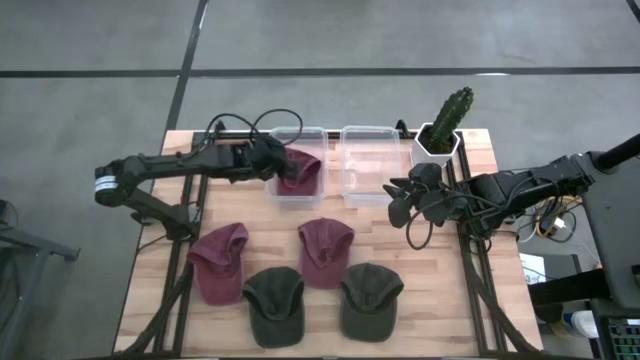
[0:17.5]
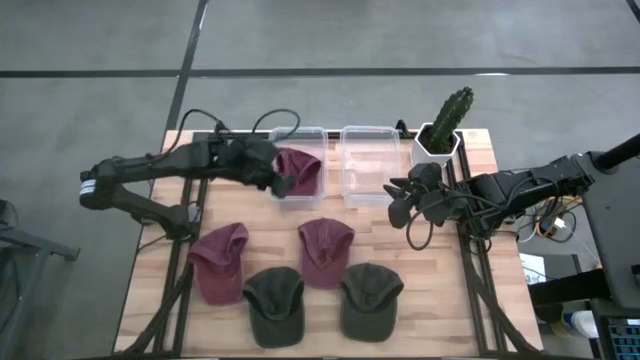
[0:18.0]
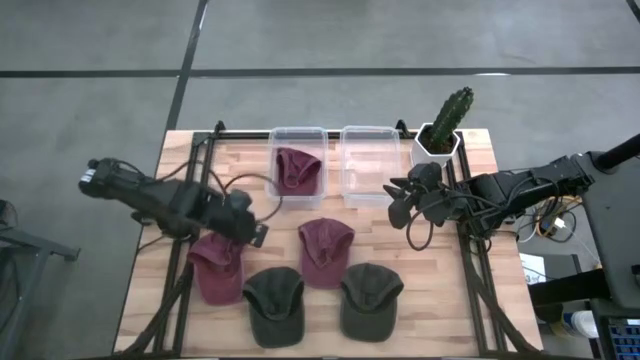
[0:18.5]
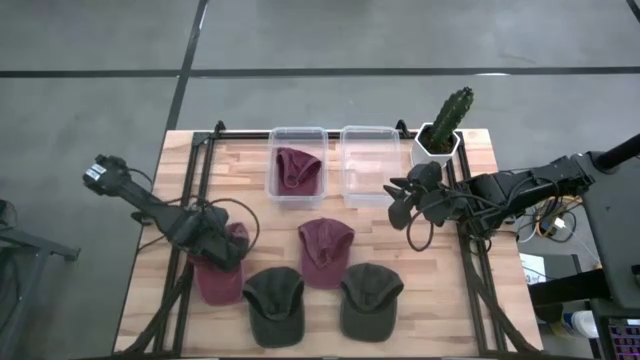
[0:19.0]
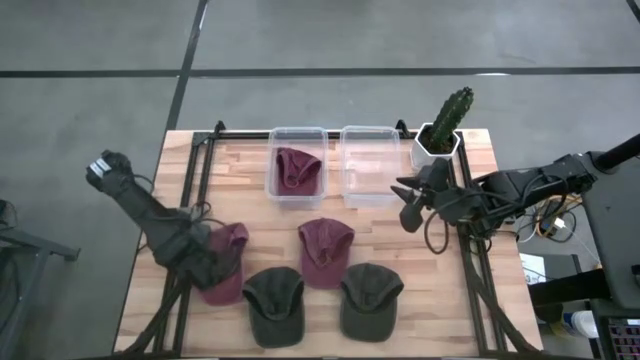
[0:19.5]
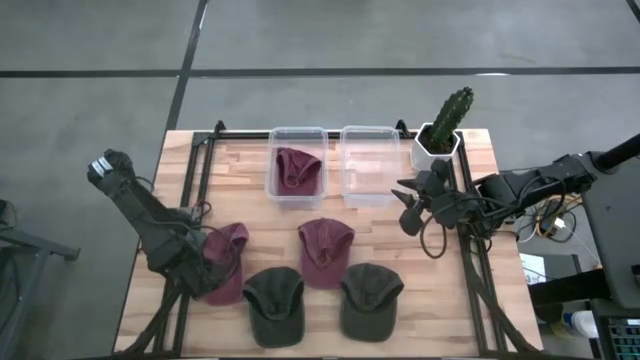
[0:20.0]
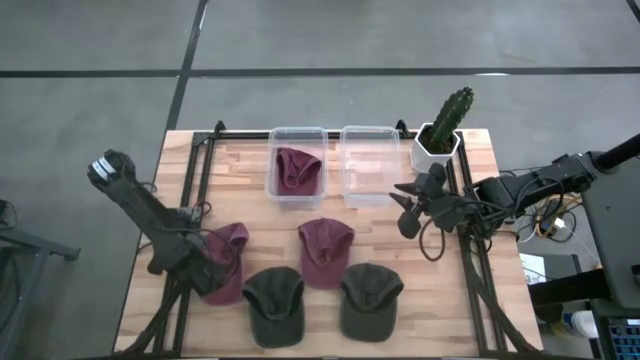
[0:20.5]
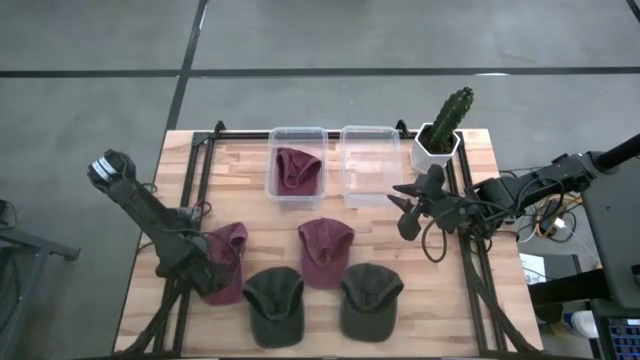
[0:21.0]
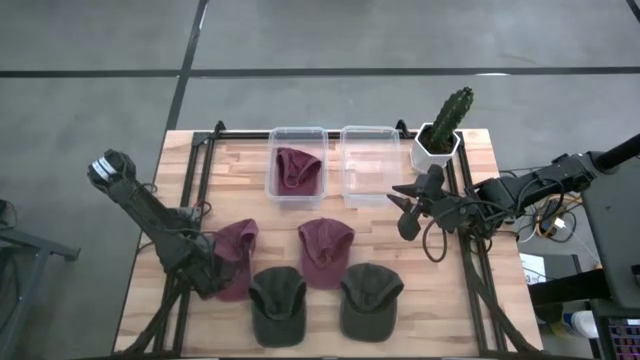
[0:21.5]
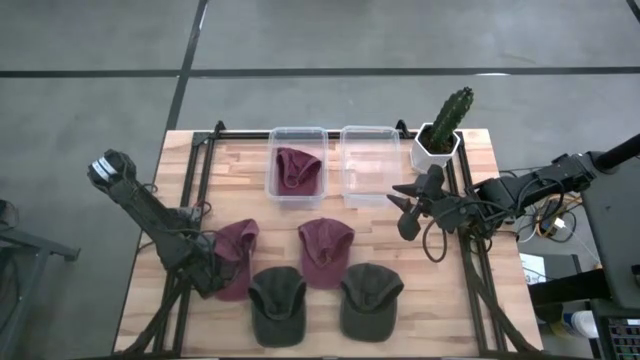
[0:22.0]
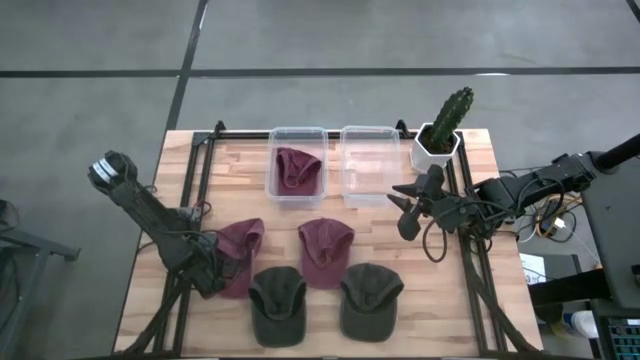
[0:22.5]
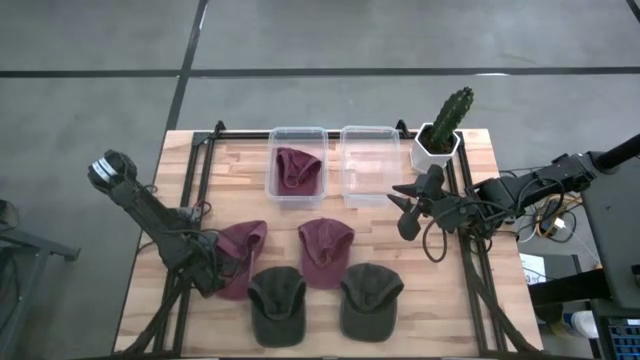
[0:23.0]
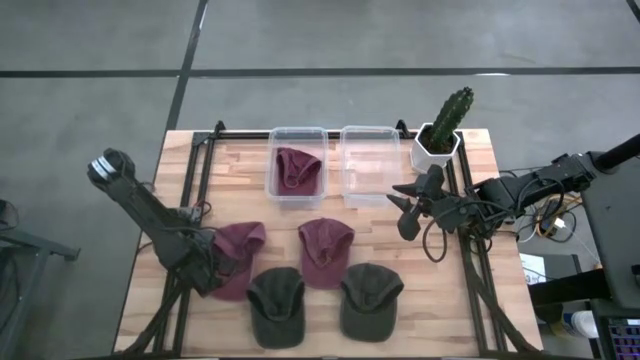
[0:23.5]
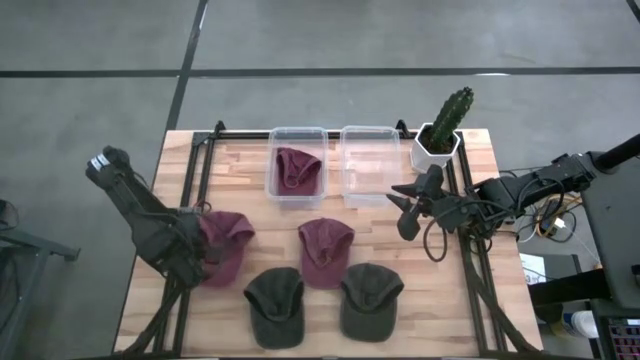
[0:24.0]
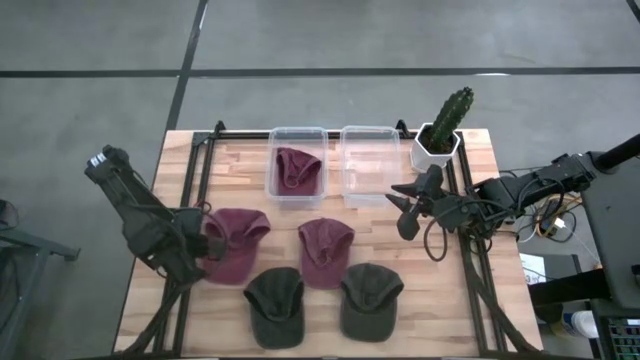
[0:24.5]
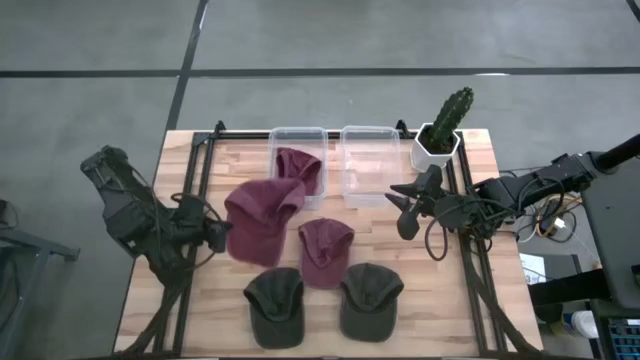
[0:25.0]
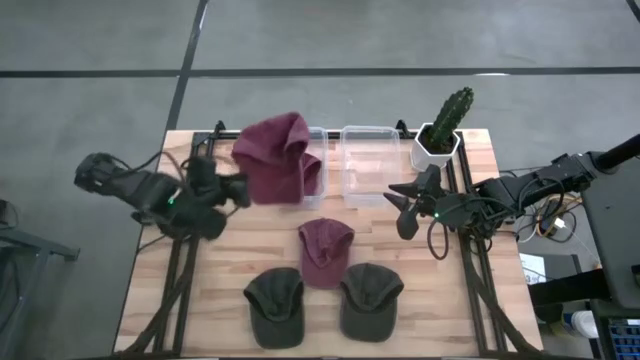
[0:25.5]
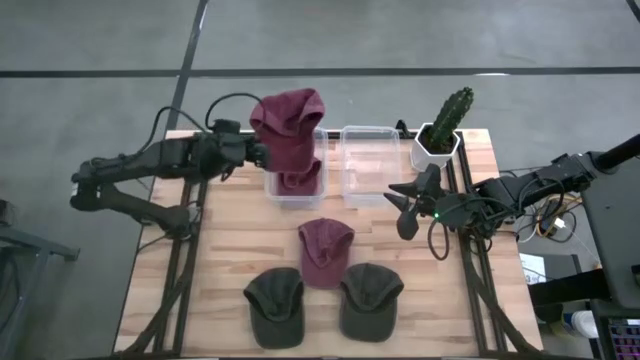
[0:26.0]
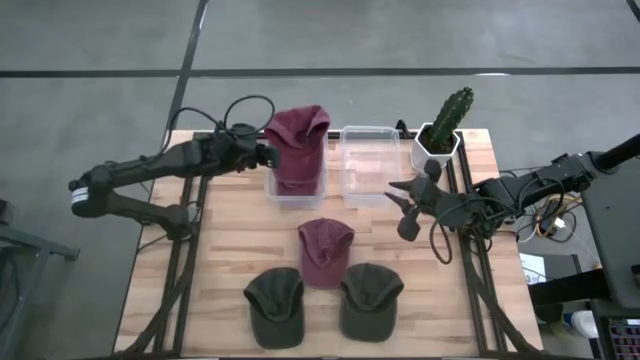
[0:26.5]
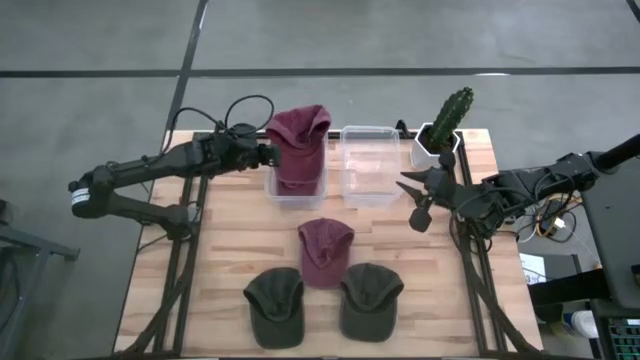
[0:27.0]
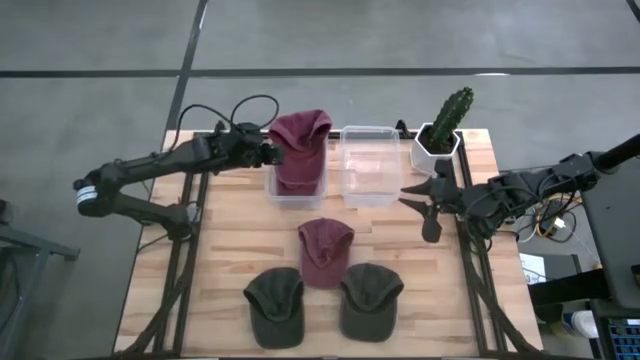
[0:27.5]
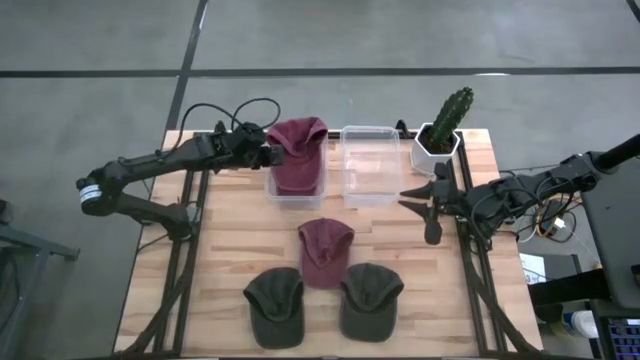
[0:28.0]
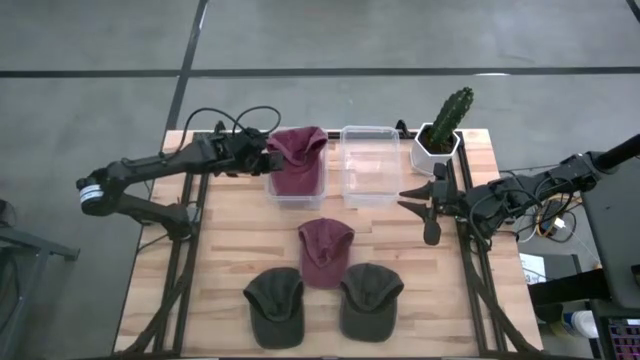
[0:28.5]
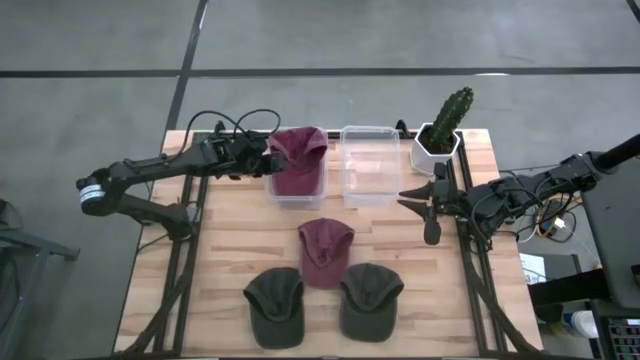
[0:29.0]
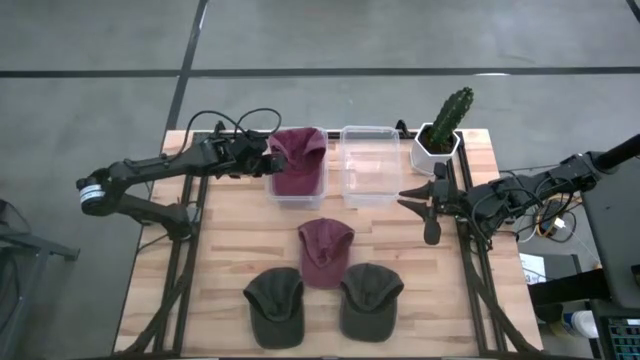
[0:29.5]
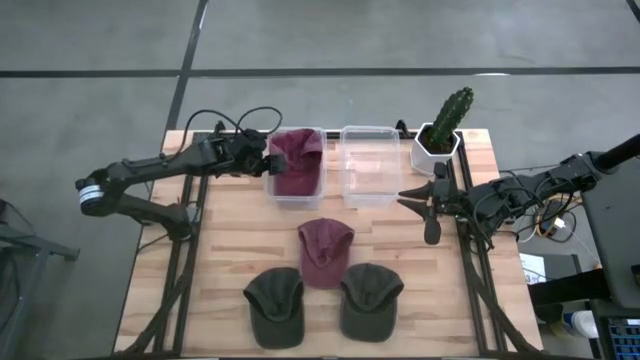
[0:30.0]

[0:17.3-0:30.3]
Task: Pick & Place hat
Put the left red cap into the left transparent bin

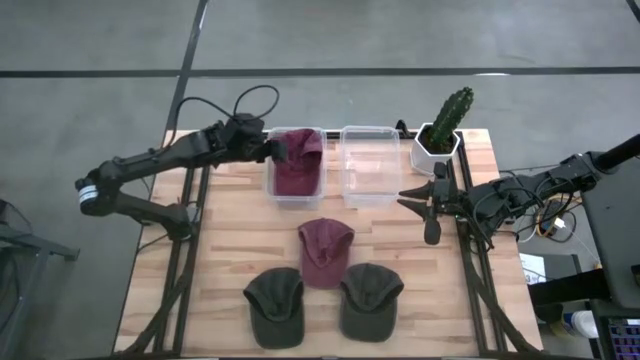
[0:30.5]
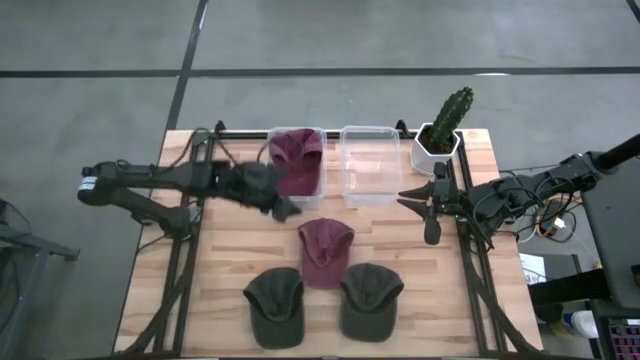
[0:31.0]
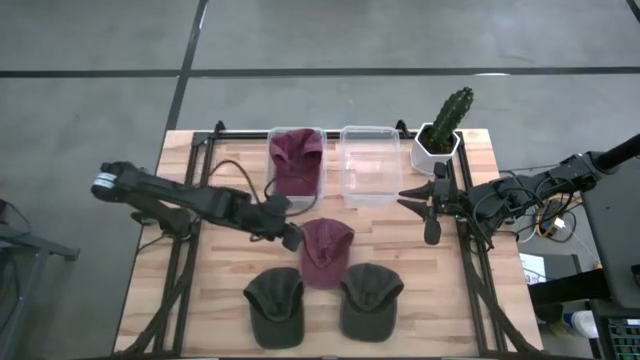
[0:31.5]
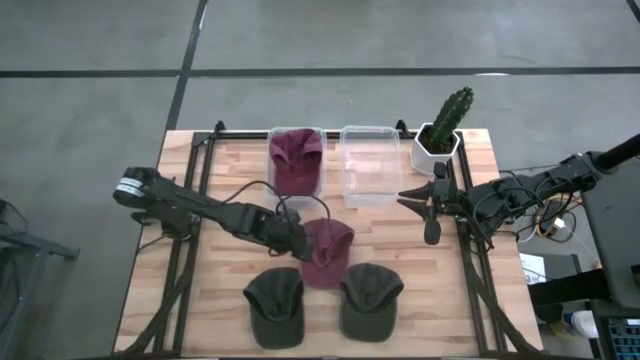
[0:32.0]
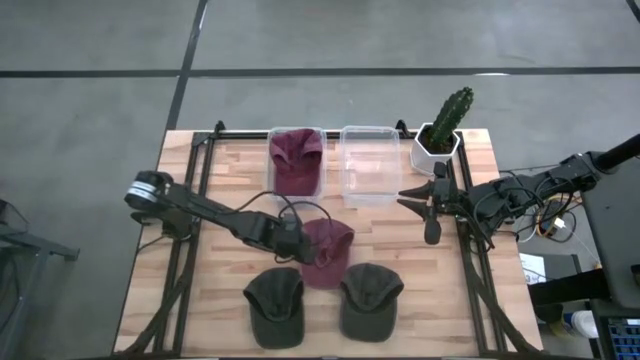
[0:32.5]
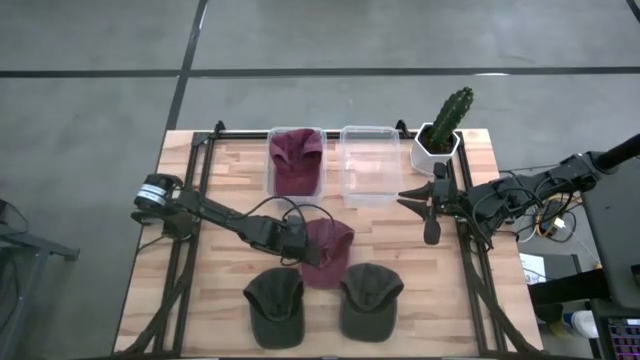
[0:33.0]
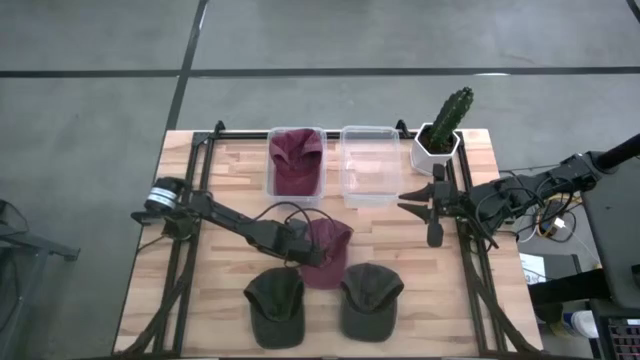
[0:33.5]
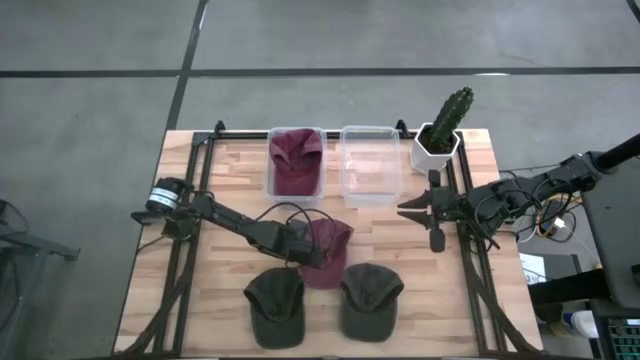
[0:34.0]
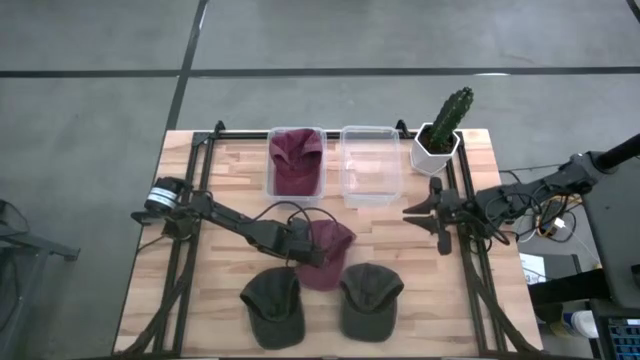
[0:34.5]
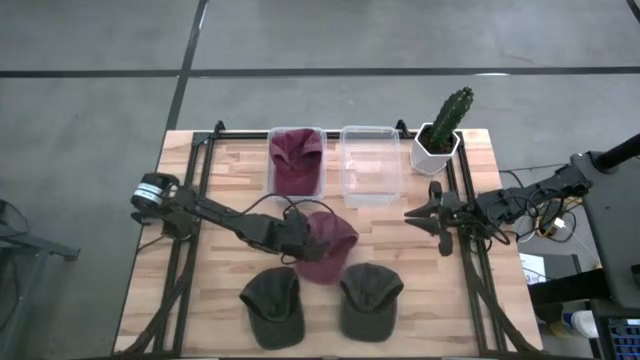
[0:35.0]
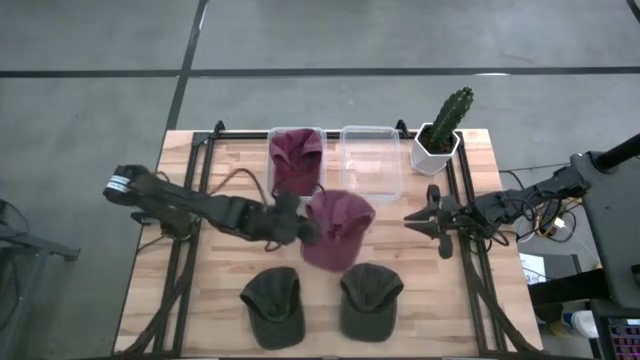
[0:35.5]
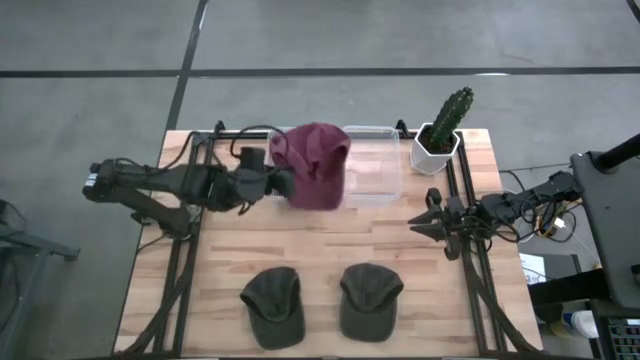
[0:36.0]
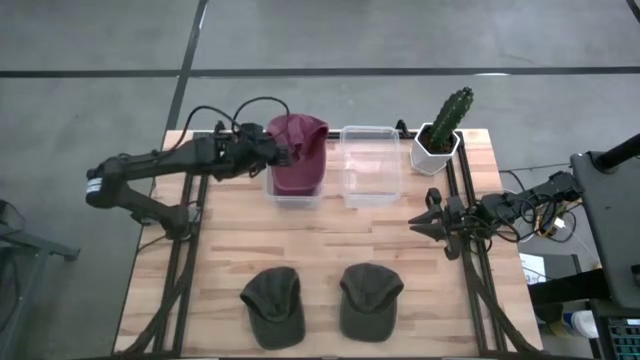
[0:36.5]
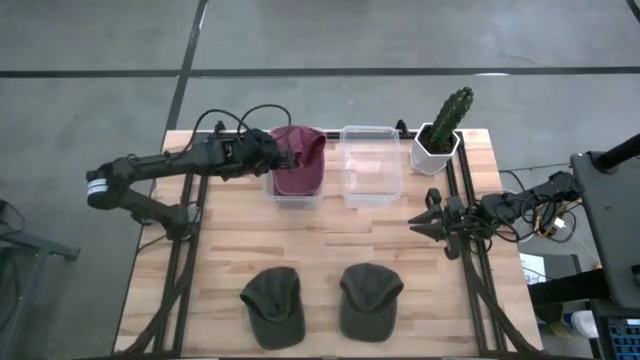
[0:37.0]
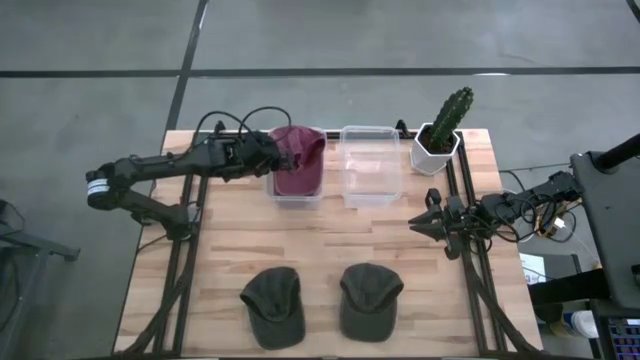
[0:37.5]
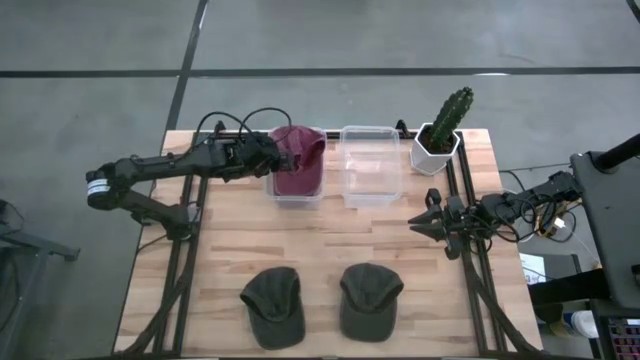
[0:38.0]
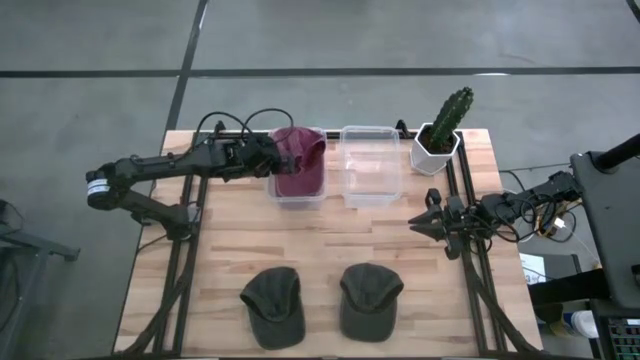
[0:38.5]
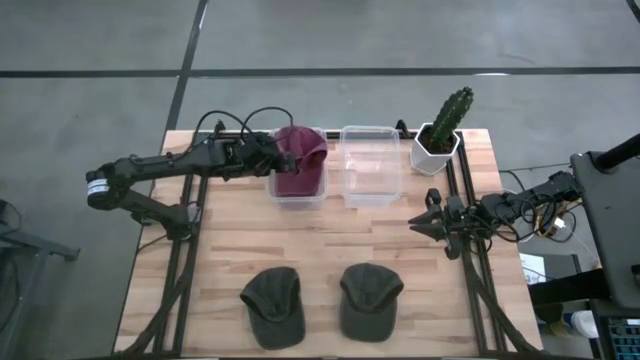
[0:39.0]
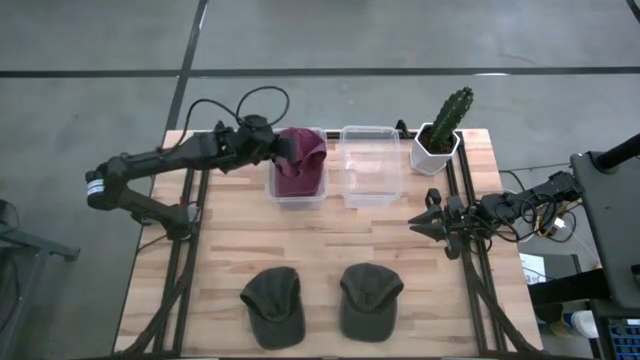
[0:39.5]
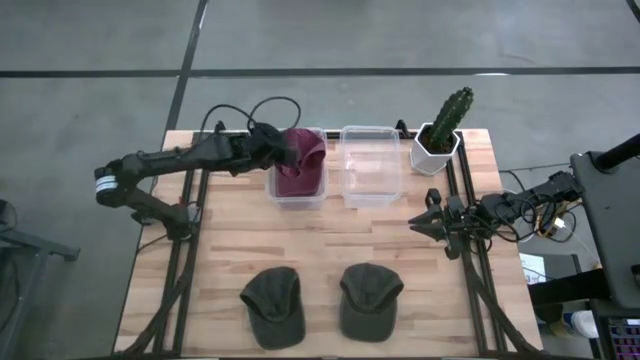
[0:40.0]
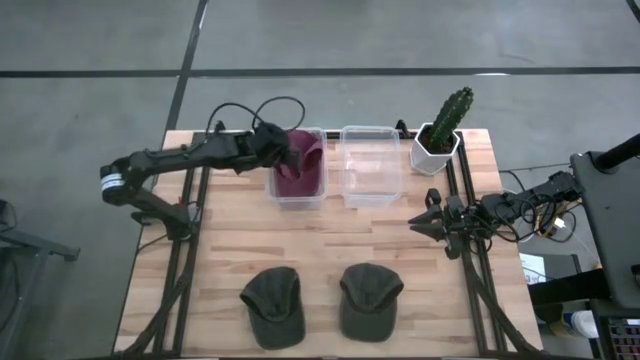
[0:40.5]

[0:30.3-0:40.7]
Put the red cap into the left transparent bin
